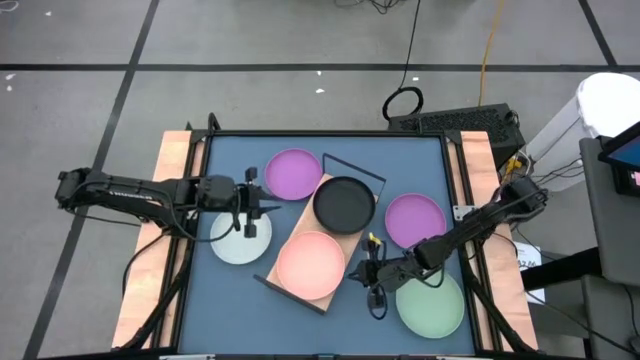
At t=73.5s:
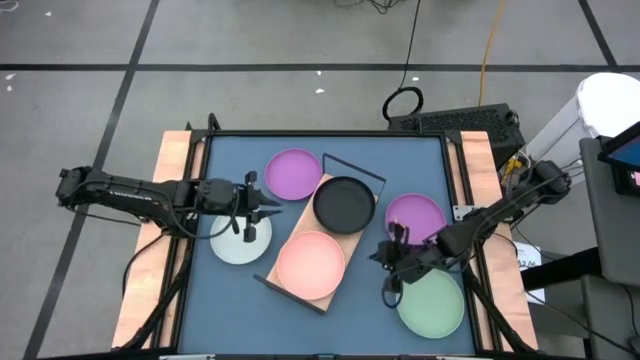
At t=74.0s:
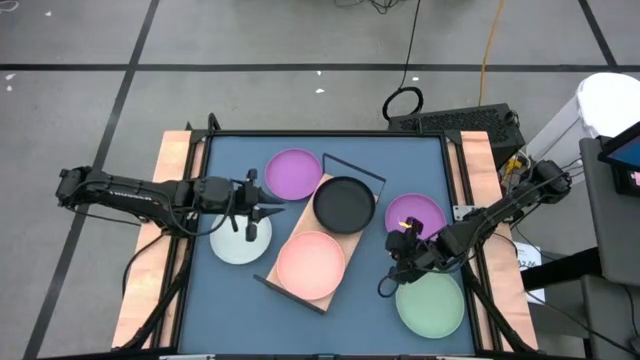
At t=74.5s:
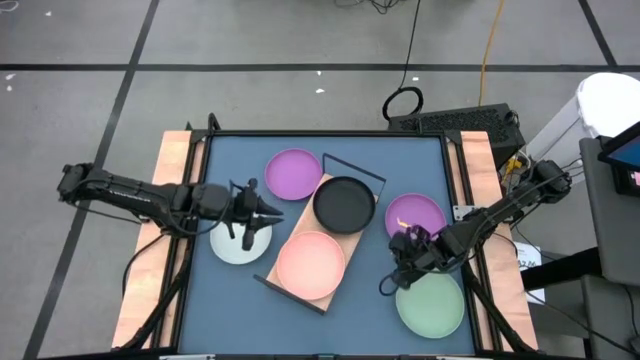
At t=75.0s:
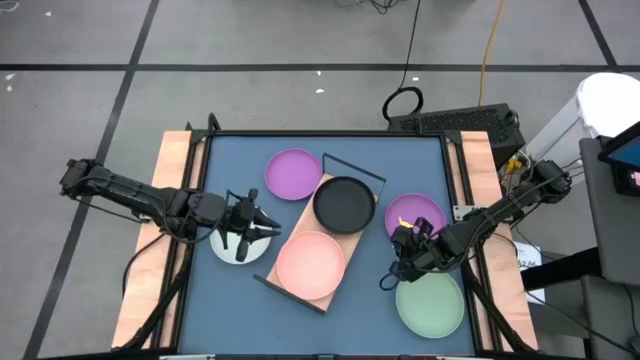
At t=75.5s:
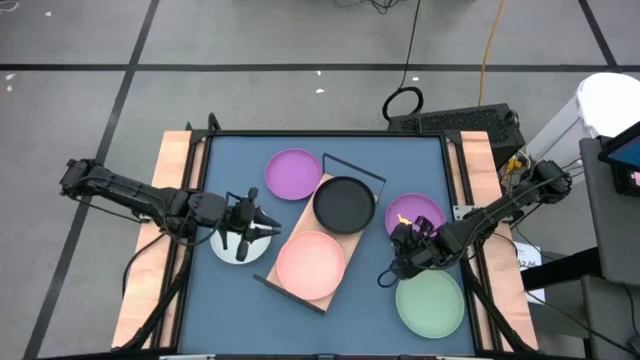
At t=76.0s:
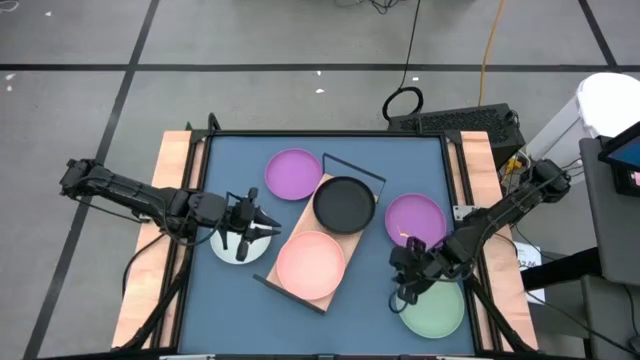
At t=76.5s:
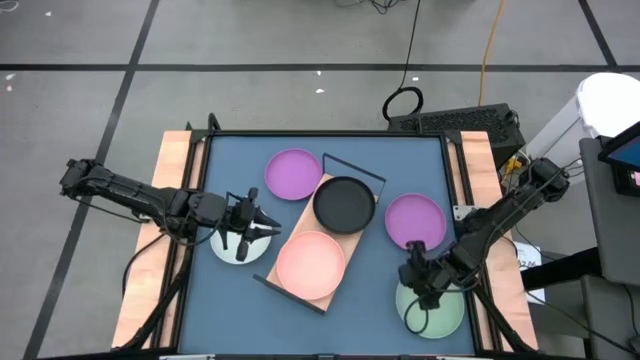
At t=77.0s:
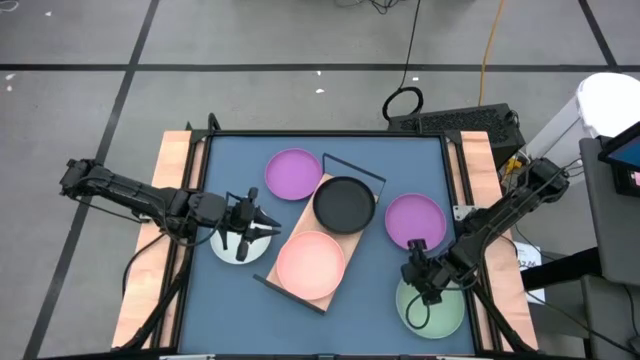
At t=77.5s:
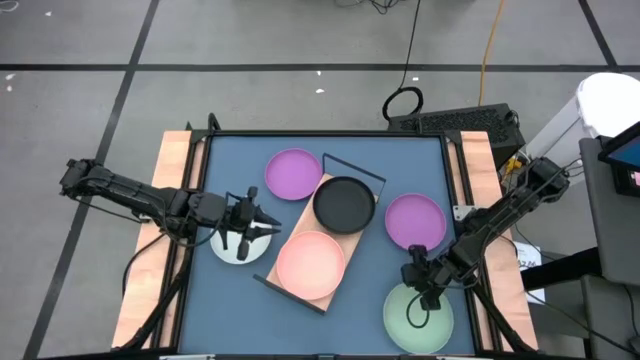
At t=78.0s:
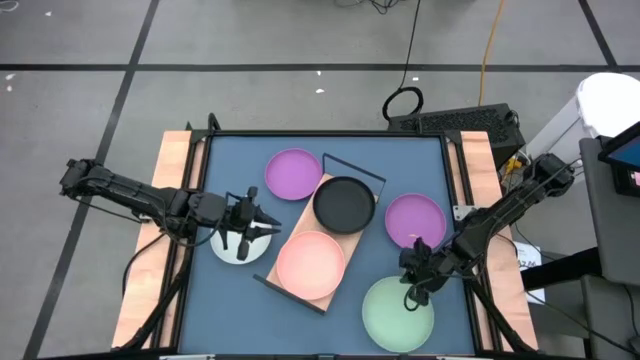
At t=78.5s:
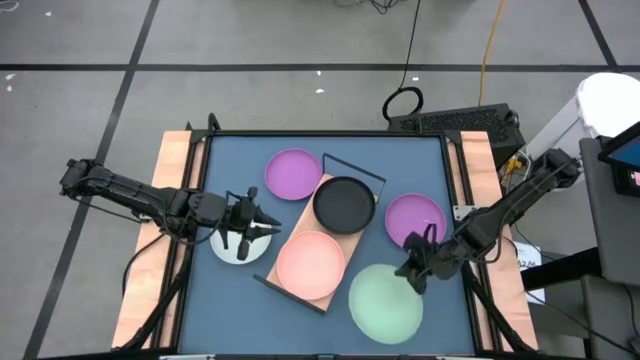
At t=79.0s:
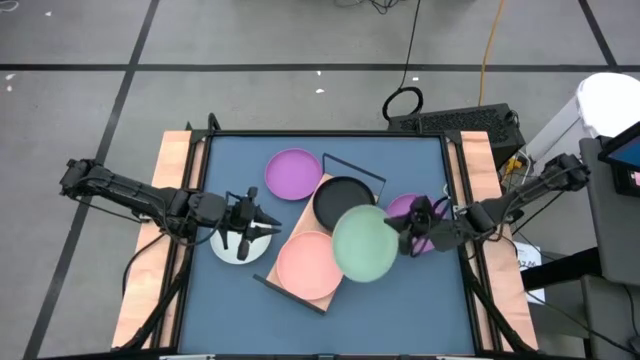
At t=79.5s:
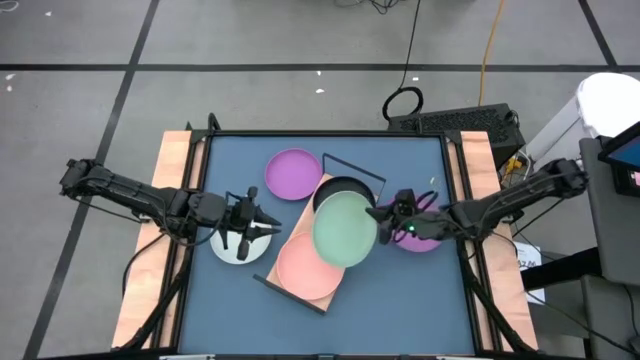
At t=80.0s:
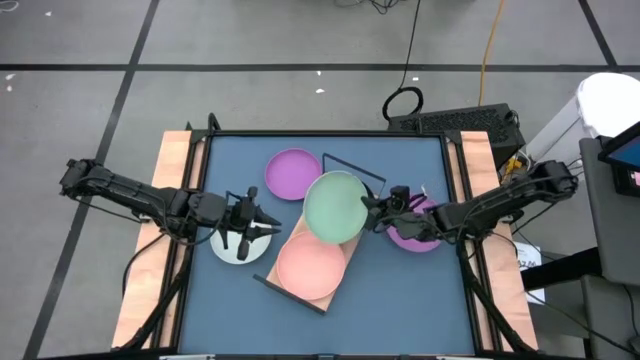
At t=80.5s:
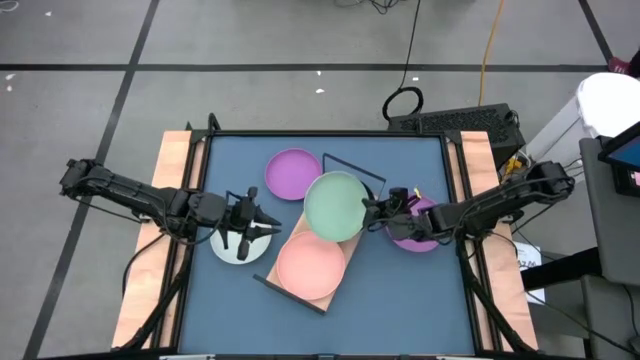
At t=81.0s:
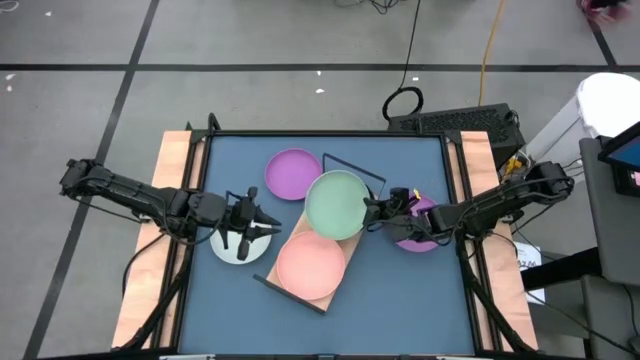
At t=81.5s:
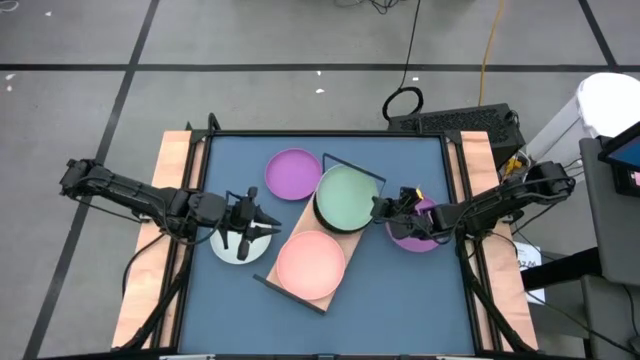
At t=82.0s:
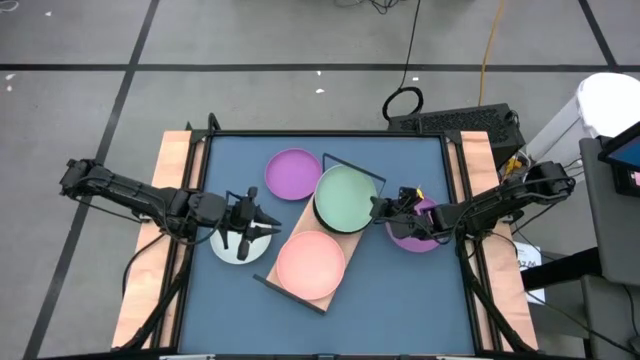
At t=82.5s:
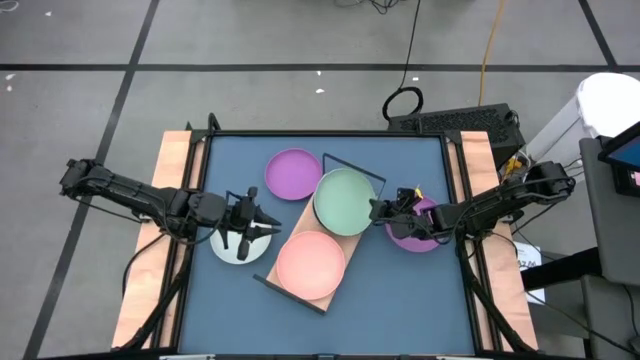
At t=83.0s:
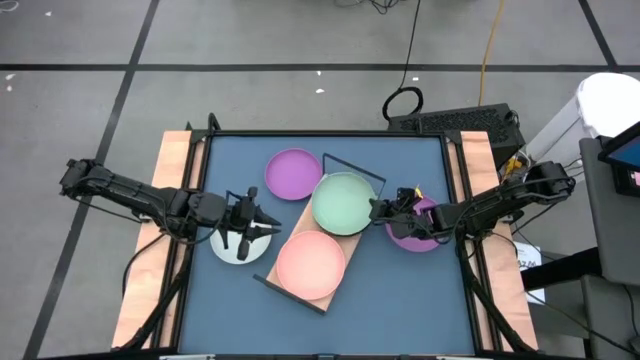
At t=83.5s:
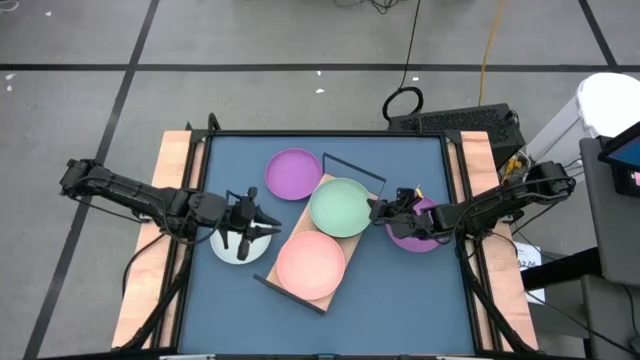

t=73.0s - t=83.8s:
Task: Place and stack plates onto a shelf
Stack the green plate on top of the black plate on the shelf

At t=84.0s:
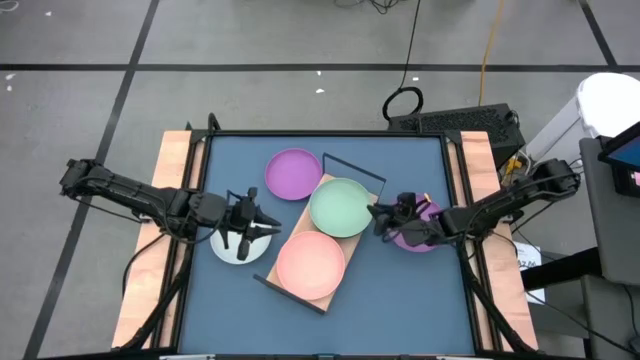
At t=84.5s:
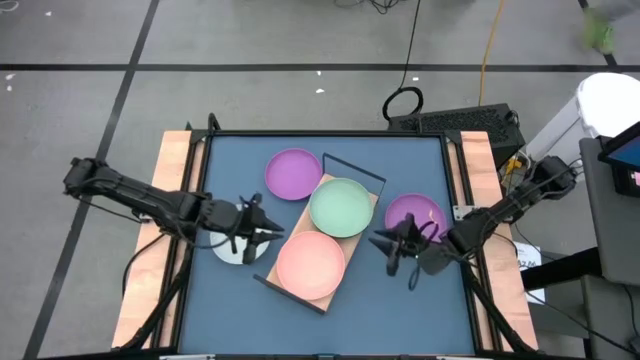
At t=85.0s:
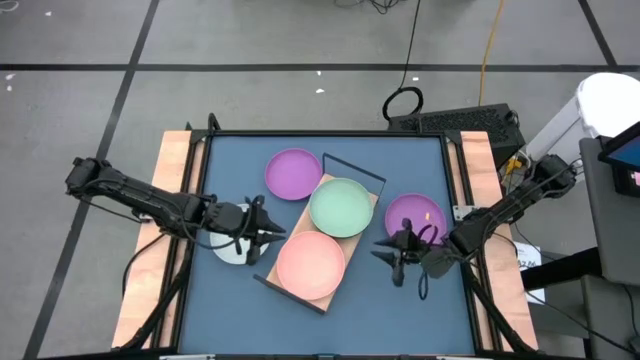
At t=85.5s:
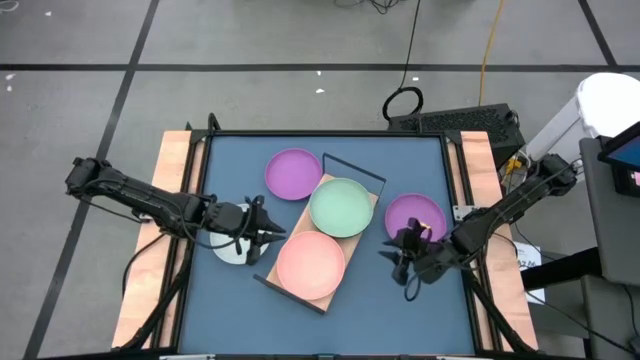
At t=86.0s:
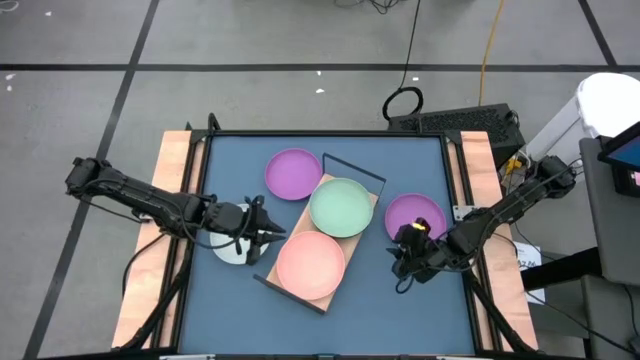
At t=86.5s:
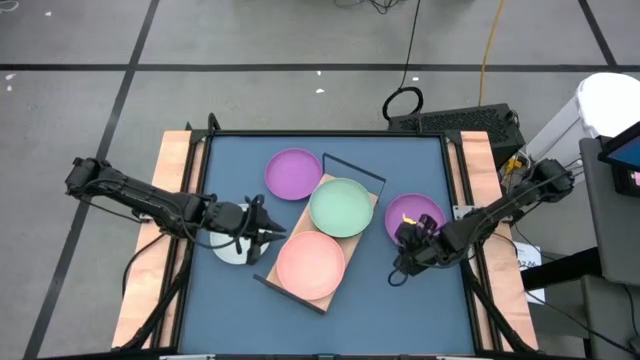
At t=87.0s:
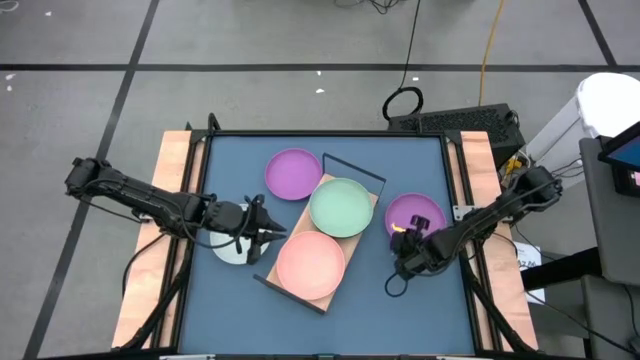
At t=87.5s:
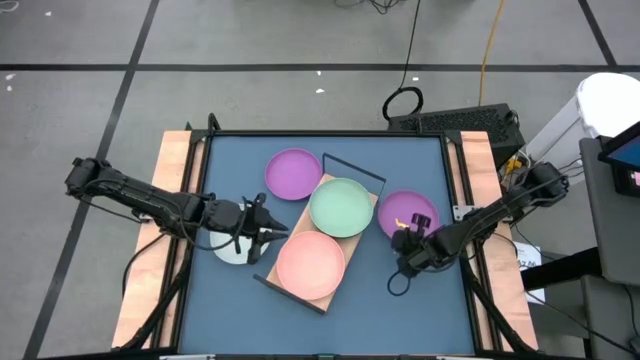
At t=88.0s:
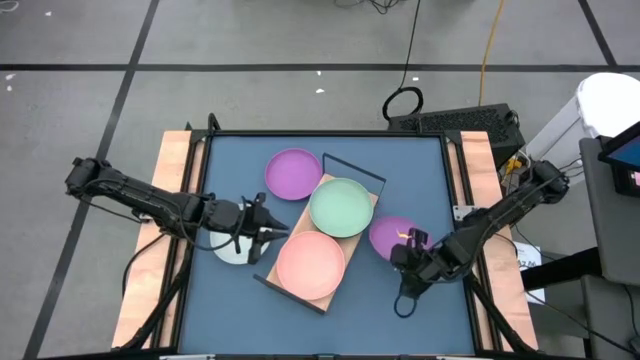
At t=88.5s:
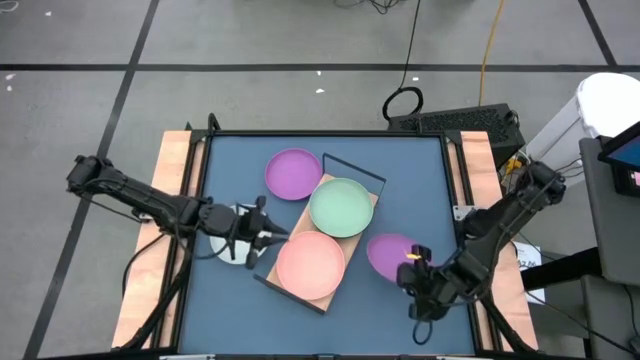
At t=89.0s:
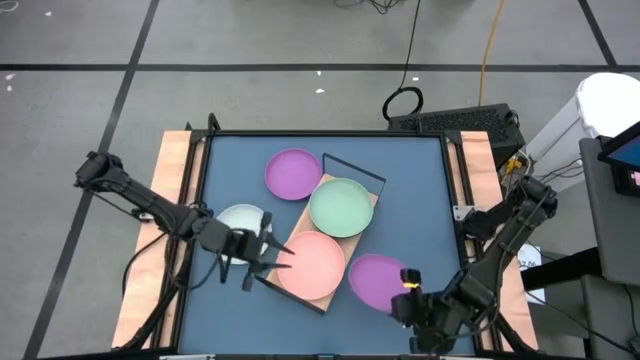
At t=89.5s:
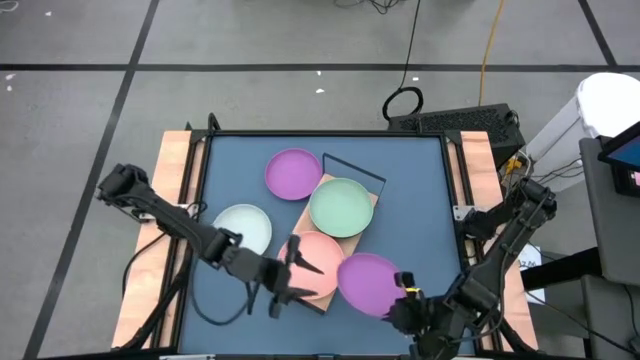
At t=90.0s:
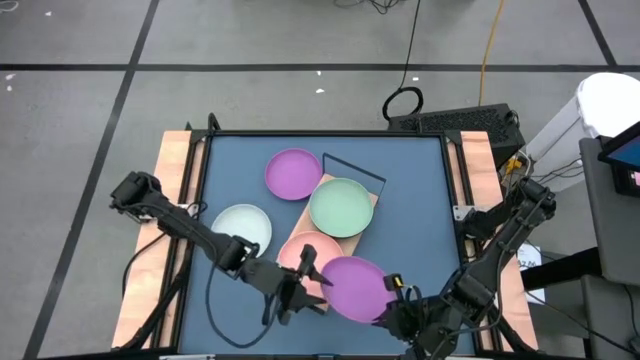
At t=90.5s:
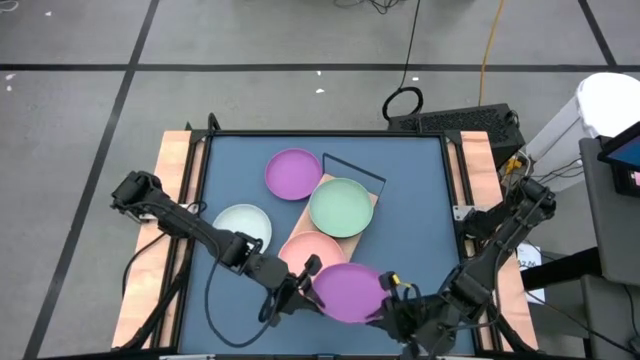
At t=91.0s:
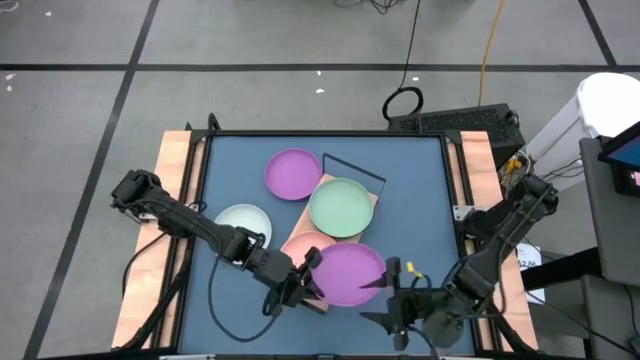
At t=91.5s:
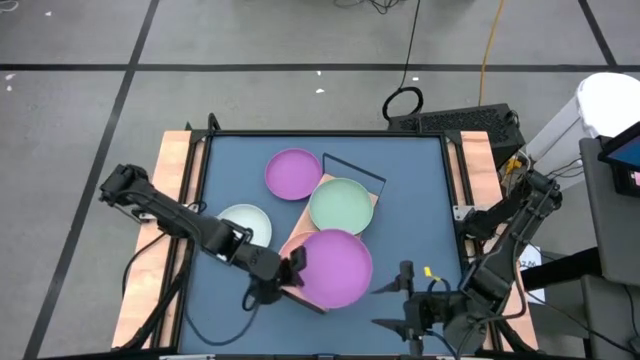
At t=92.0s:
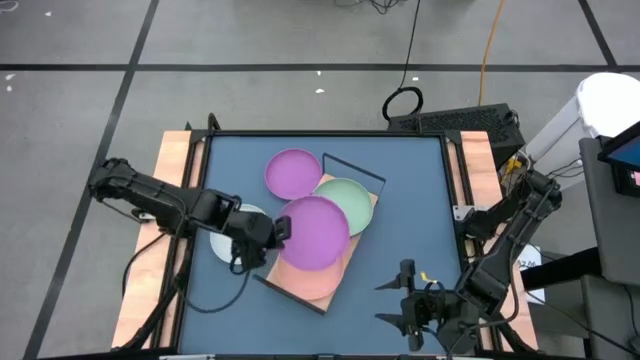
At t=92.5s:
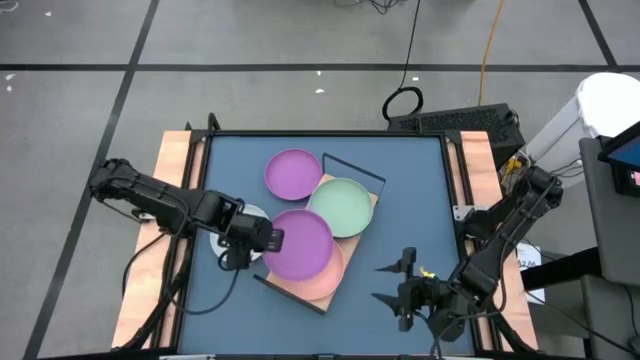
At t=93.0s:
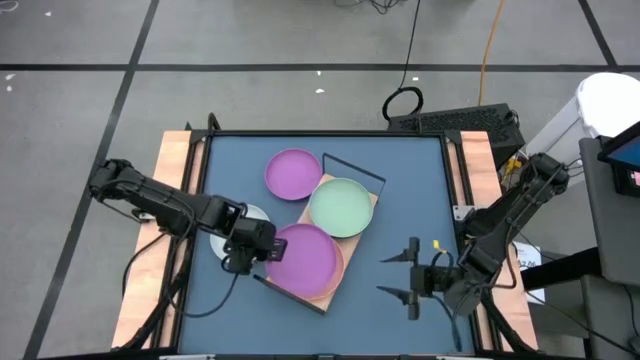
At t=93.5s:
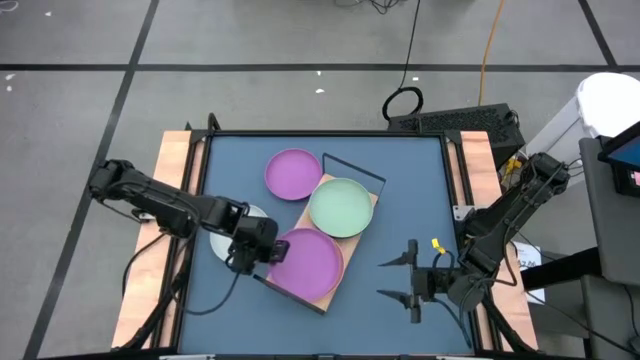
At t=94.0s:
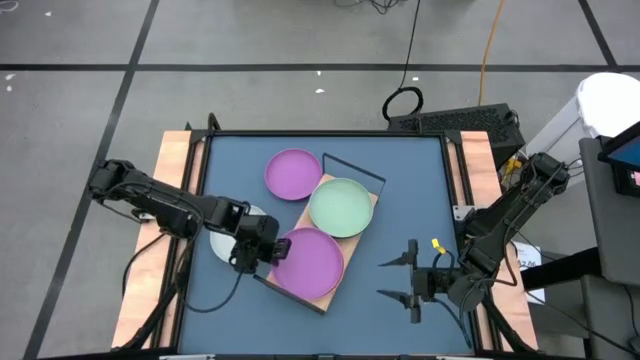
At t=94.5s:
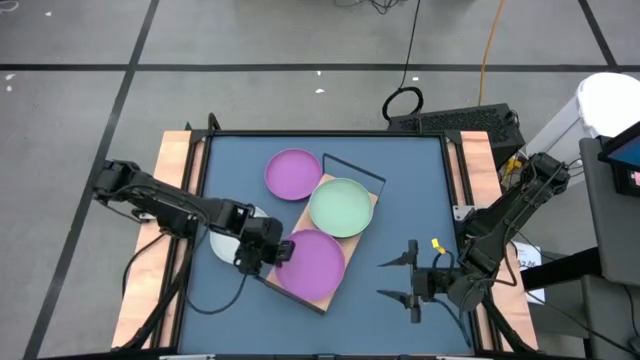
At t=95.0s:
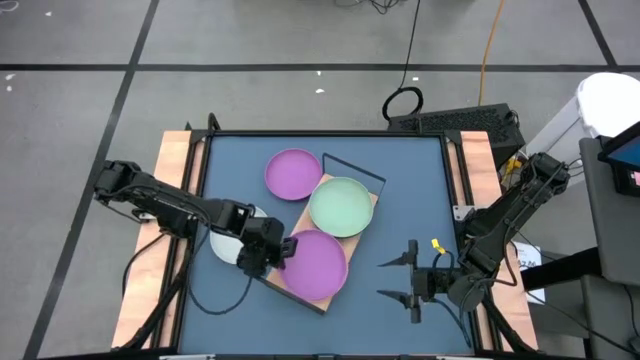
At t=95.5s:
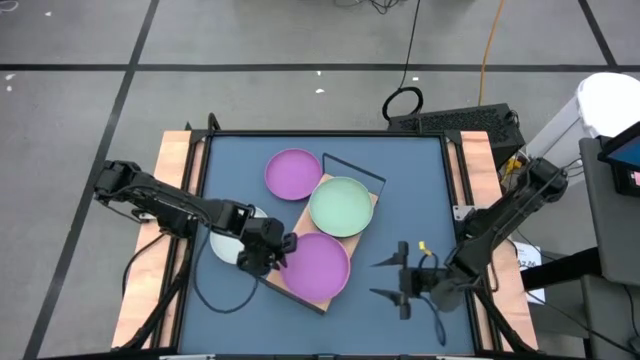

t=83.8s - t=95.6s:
Stack the bottom purple plate on top of the pink plate on the shelf
